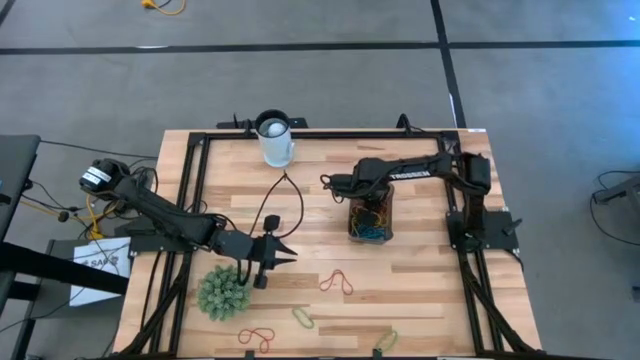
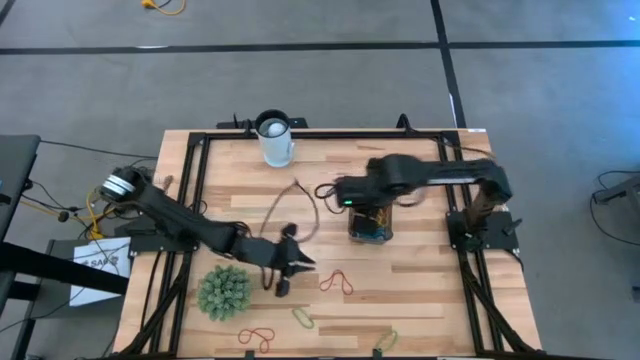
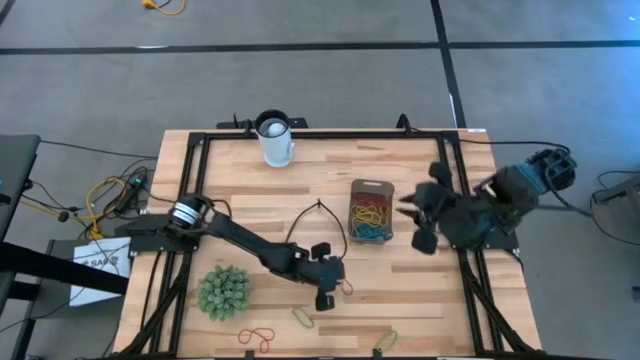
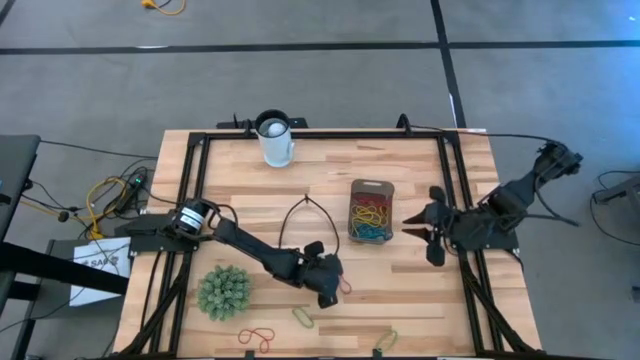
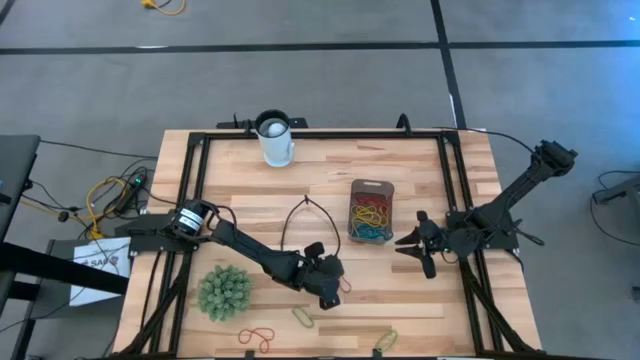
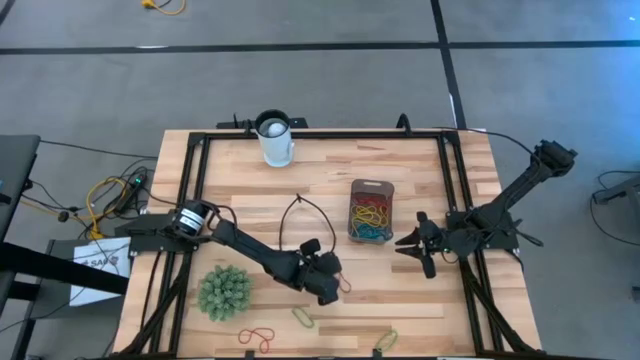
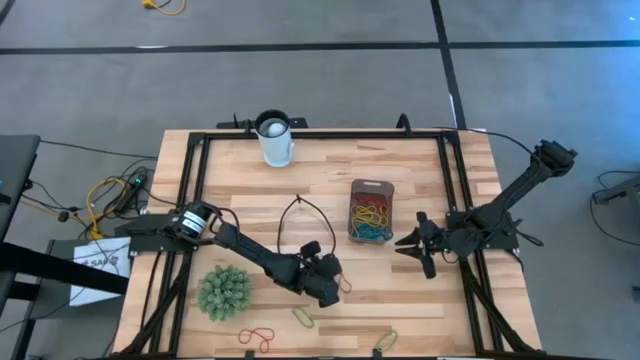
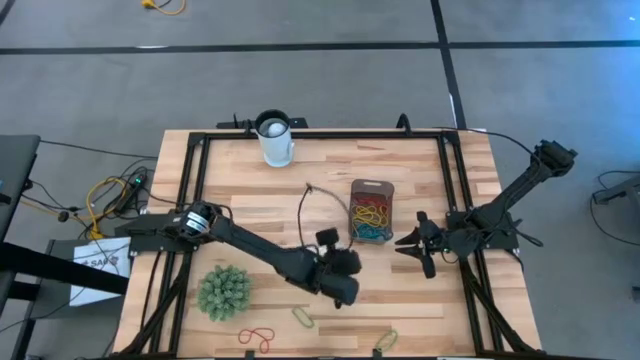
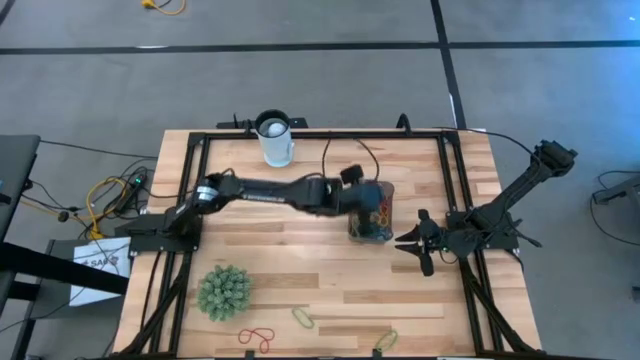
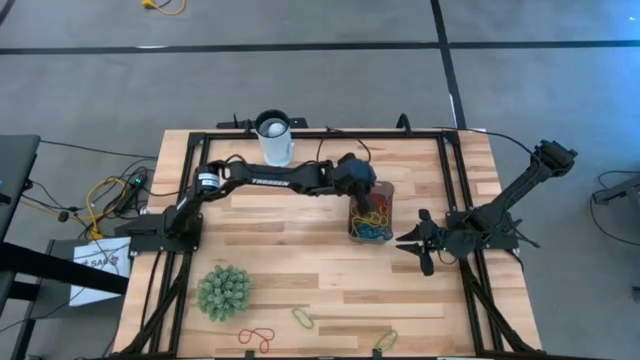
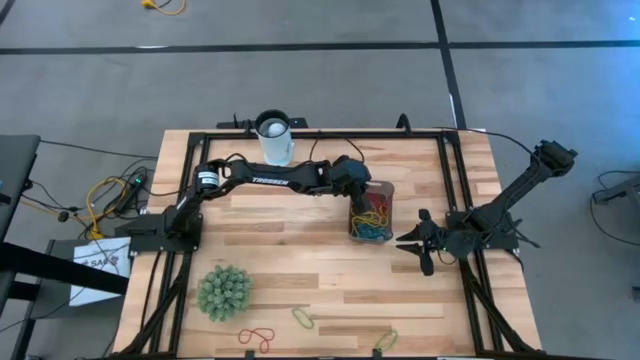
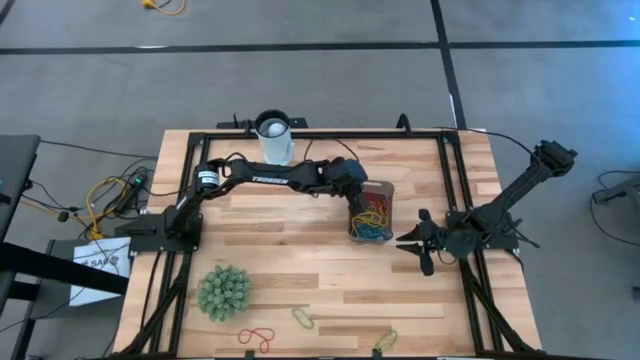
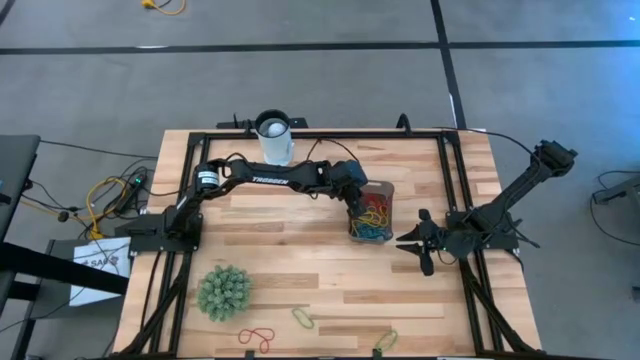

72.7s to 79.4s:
Task: Pick and place items into bin
Put the red rubber band into the black bin

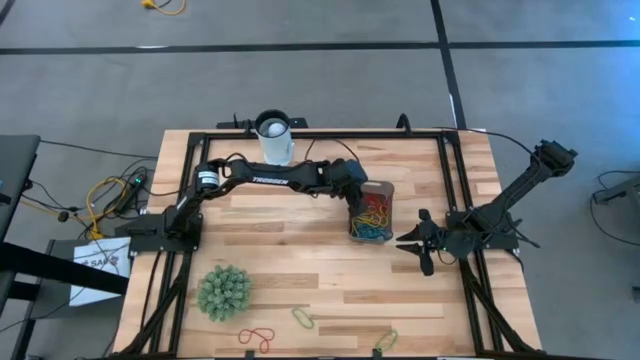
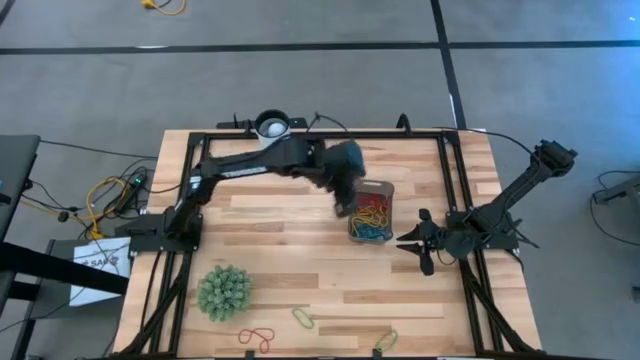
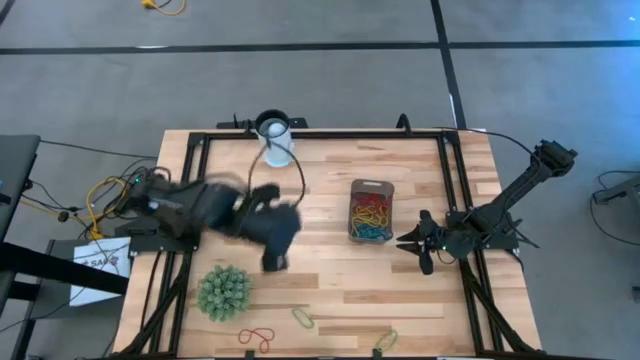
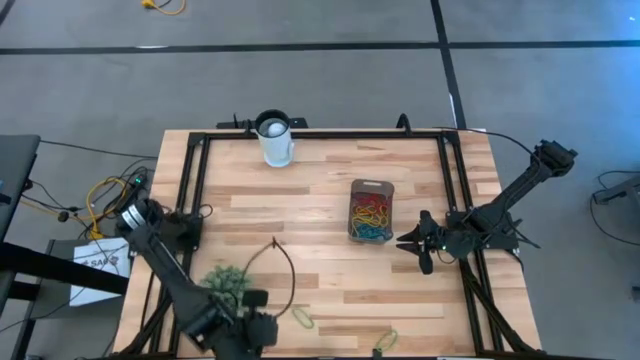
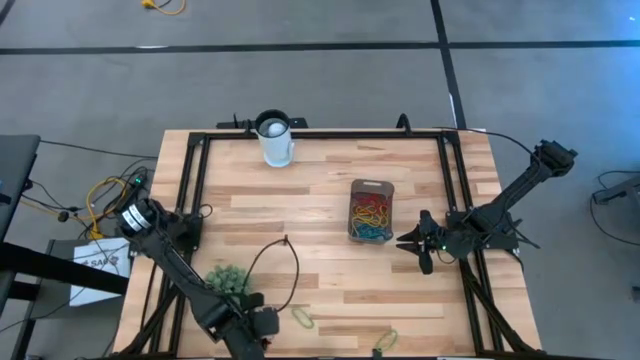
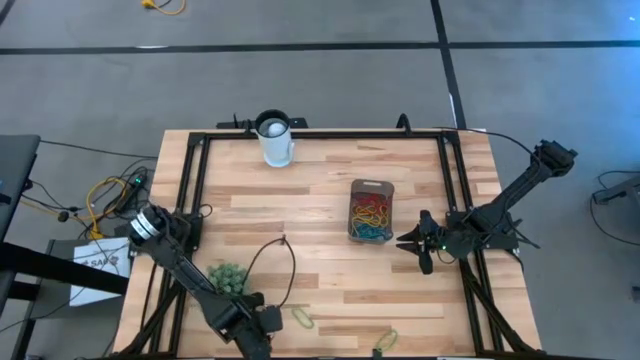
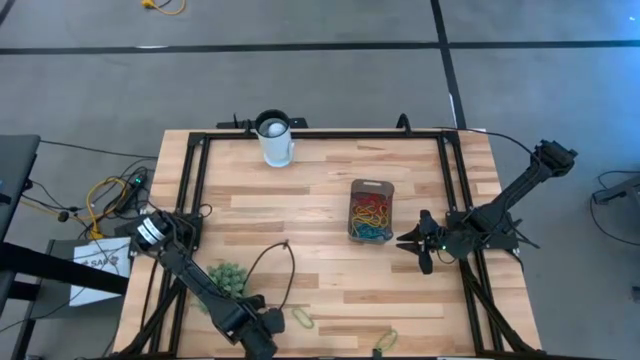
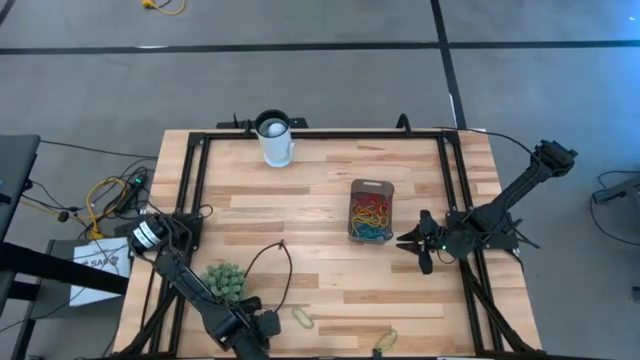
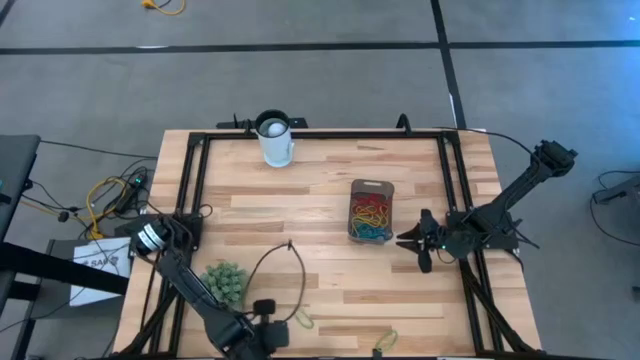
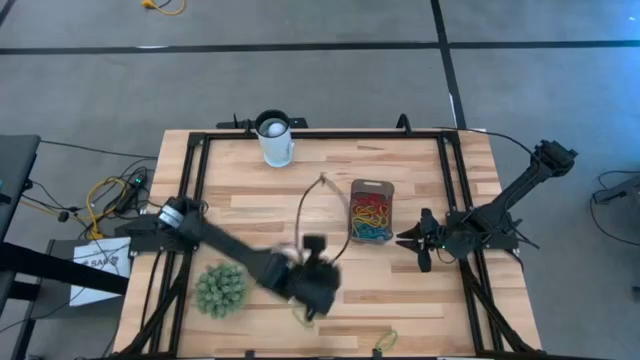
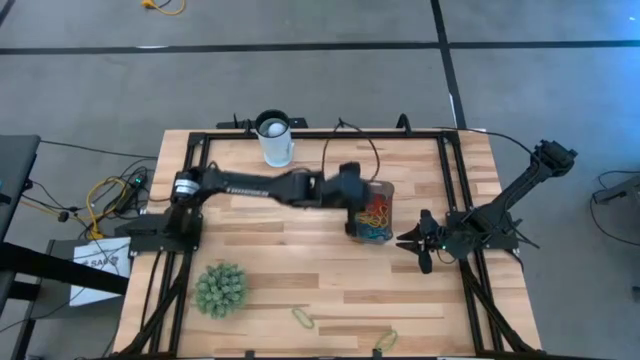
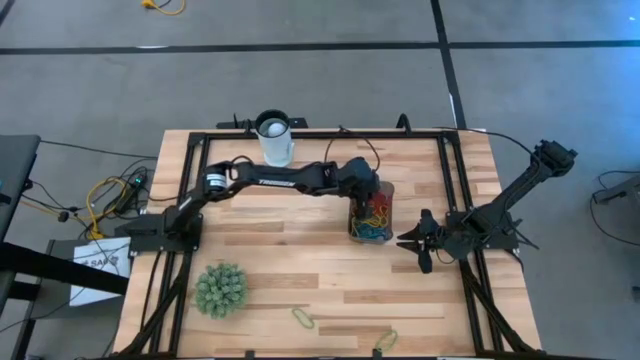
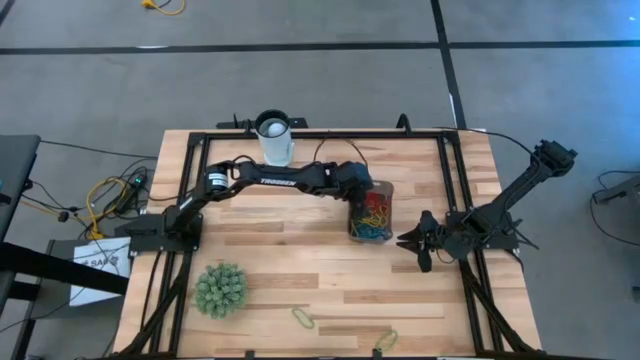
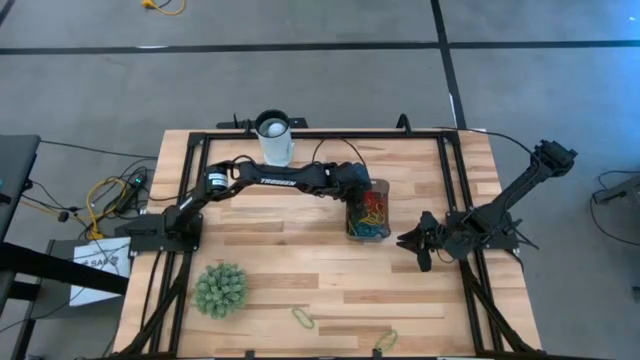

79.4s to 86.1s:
Put the red rubber band into the black bin

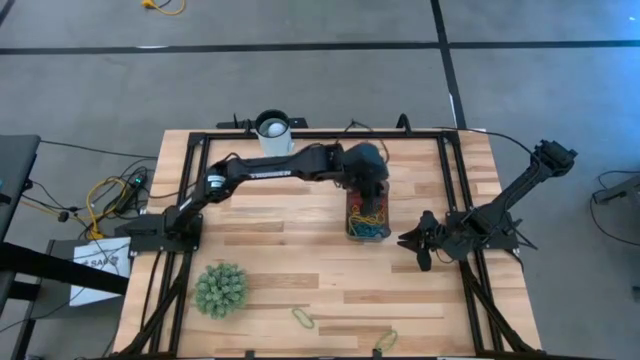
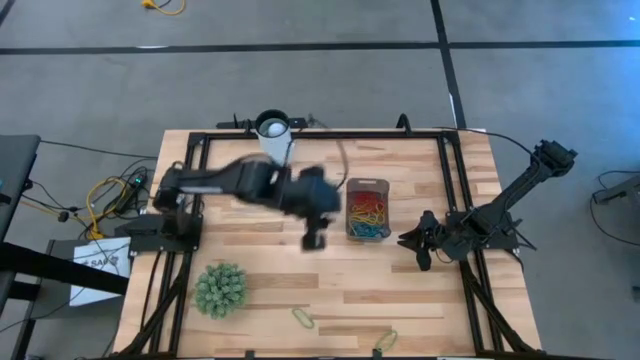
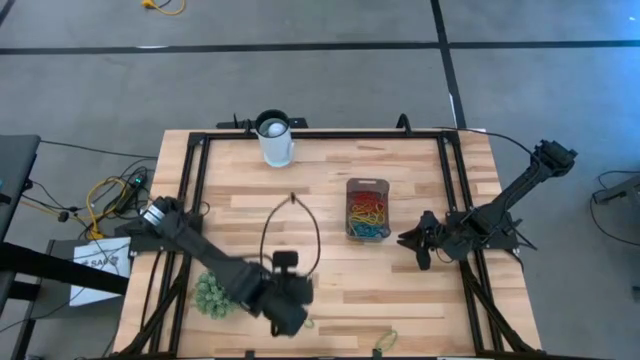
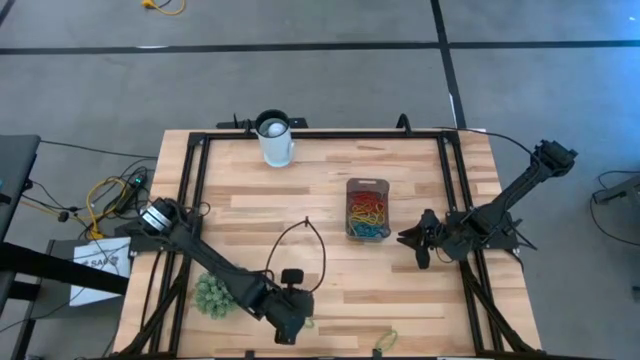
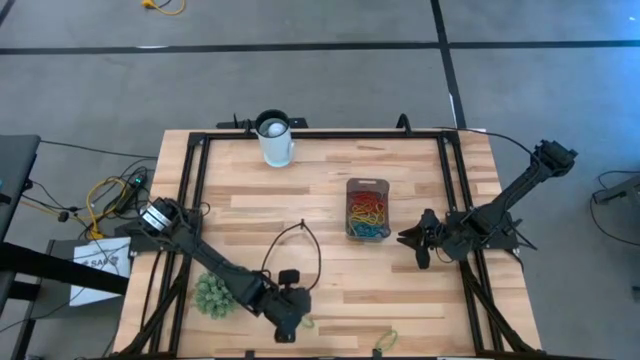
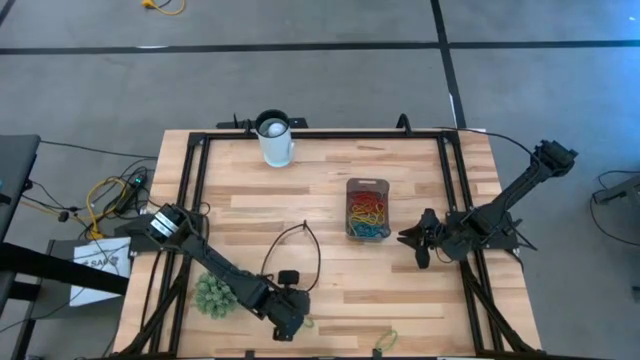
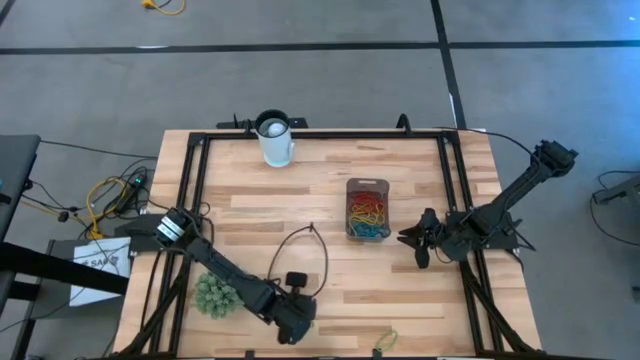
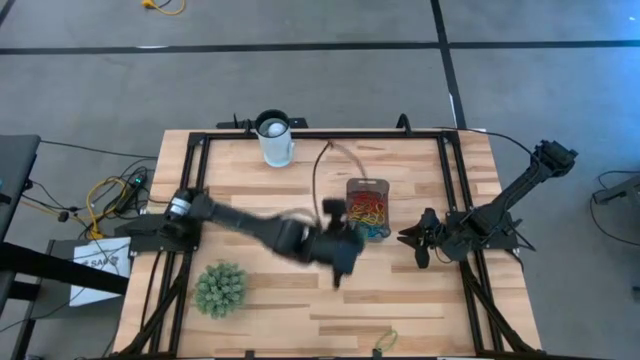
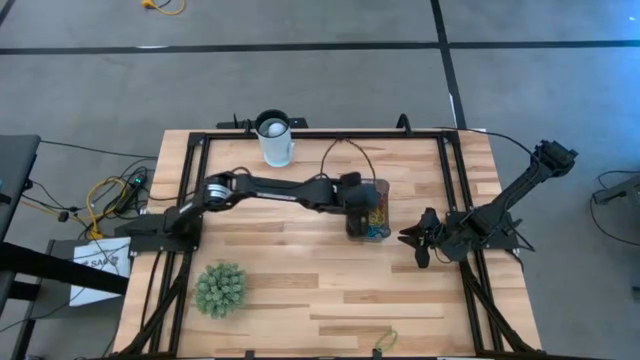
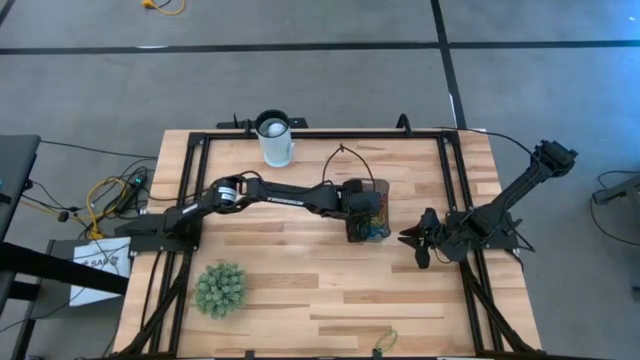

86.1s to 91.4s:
Put the green rubber band into the black bin

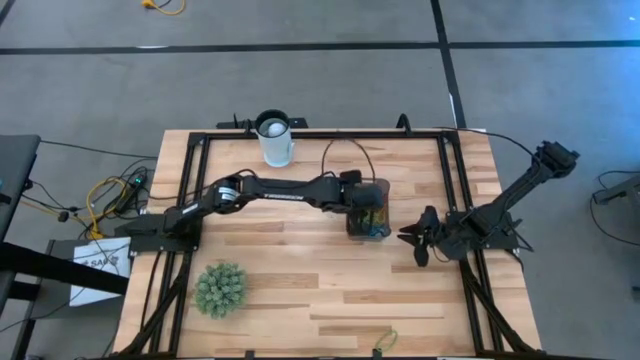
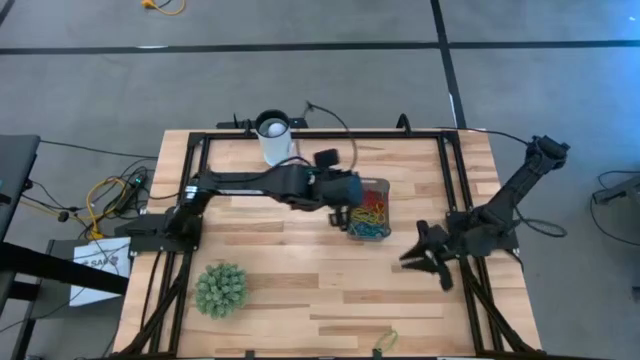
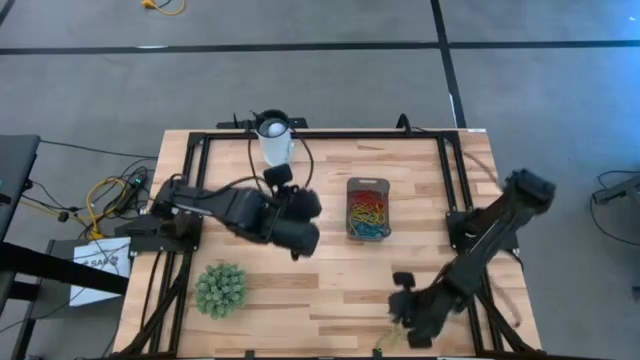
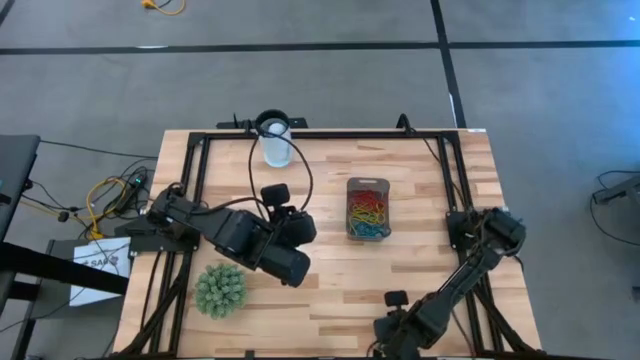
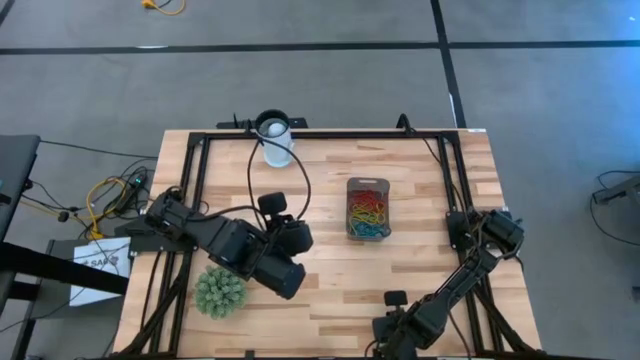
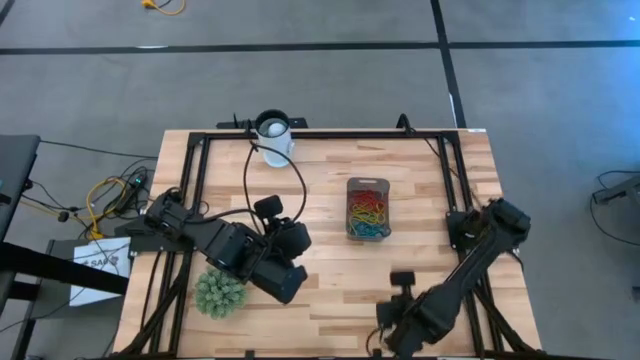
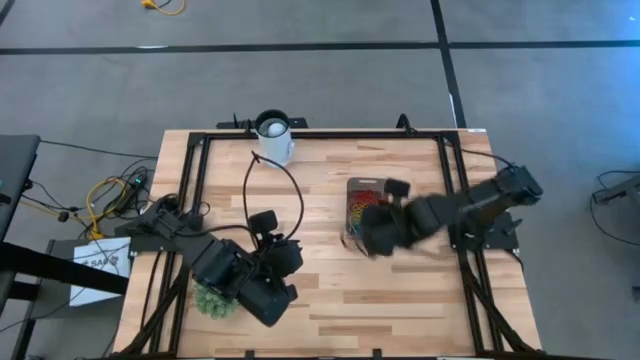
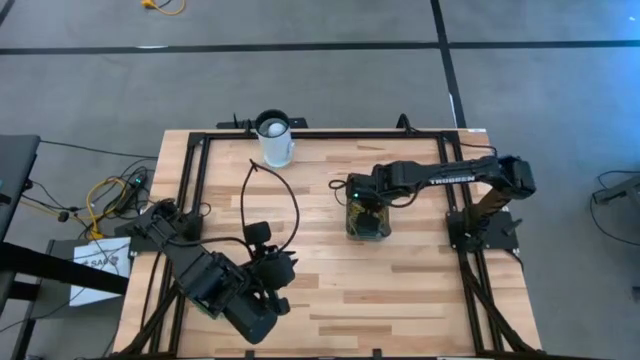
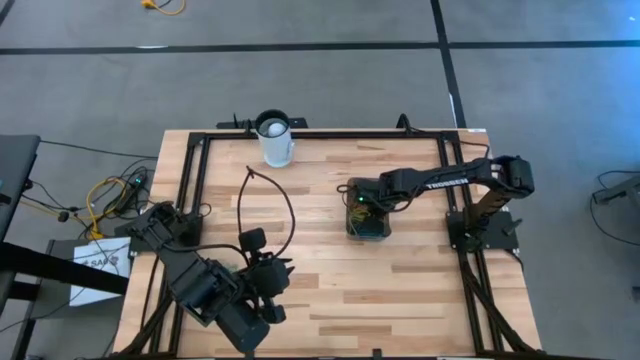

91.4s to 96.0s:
Put the green rubber band into the black bin
